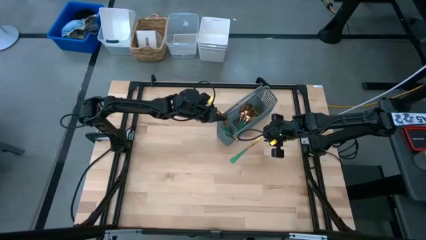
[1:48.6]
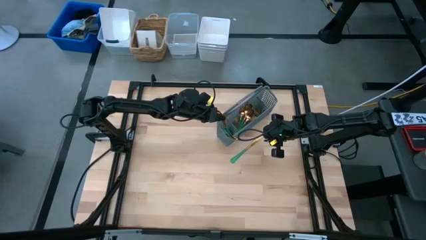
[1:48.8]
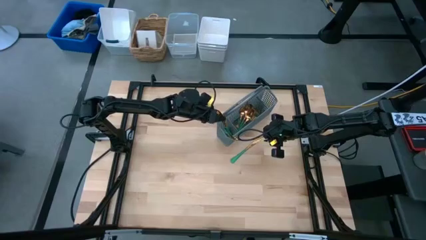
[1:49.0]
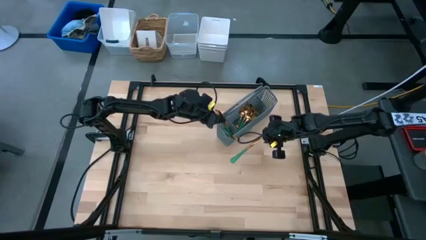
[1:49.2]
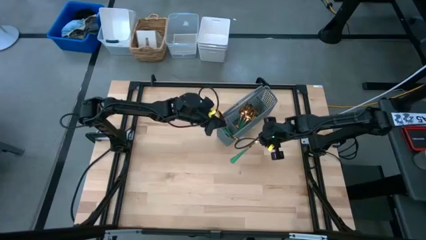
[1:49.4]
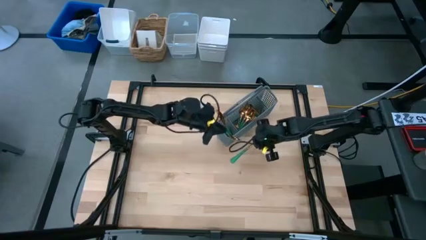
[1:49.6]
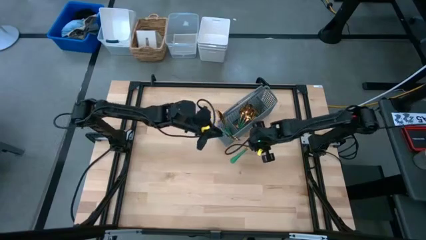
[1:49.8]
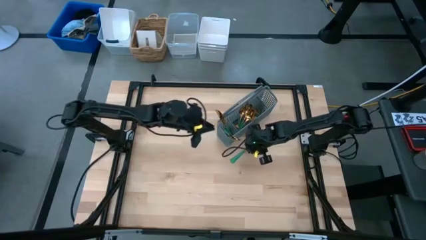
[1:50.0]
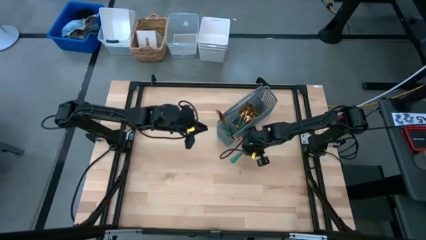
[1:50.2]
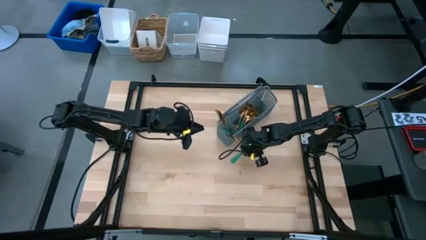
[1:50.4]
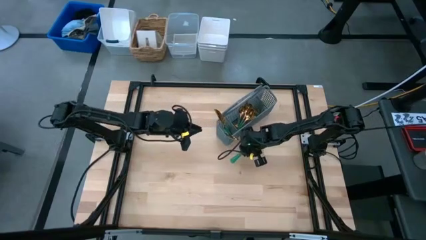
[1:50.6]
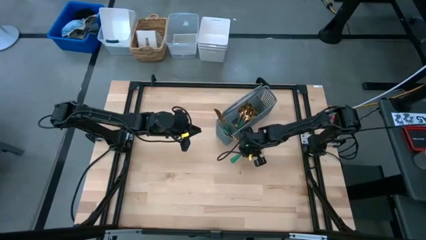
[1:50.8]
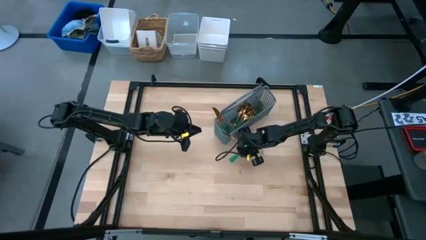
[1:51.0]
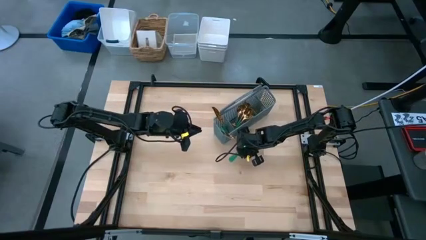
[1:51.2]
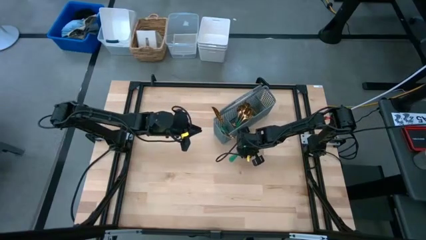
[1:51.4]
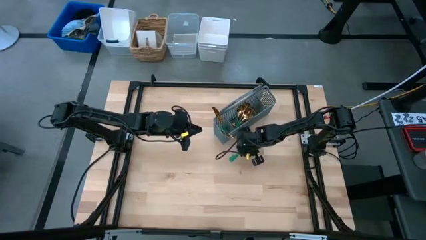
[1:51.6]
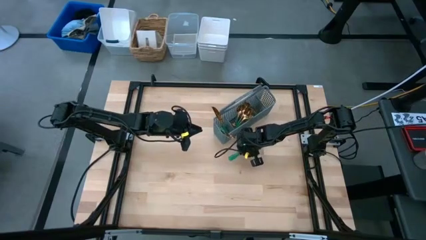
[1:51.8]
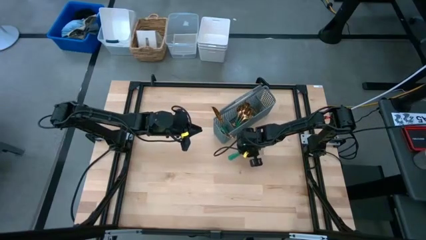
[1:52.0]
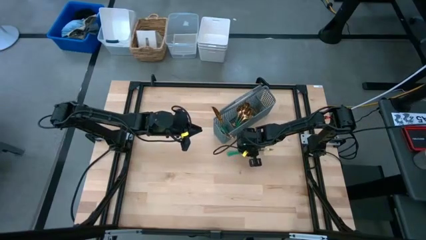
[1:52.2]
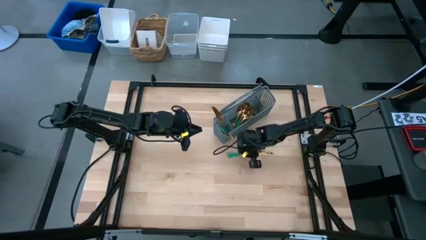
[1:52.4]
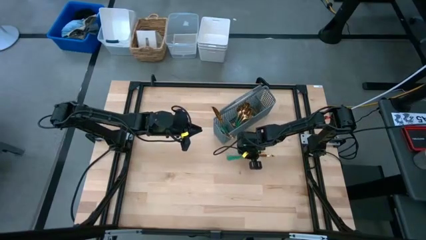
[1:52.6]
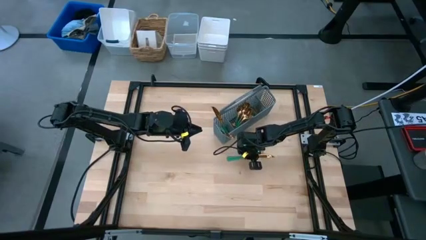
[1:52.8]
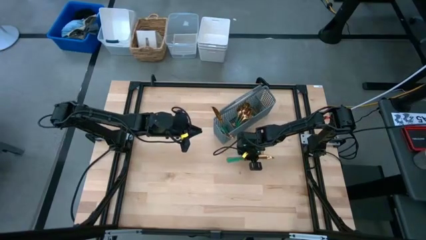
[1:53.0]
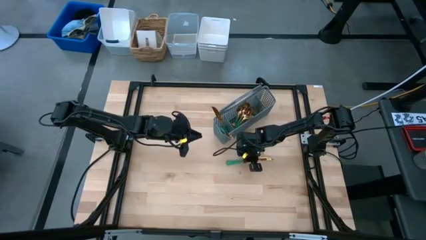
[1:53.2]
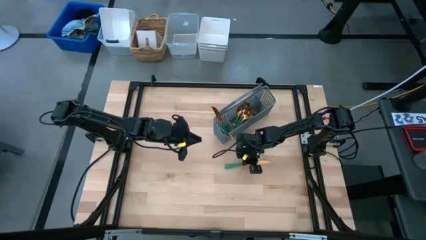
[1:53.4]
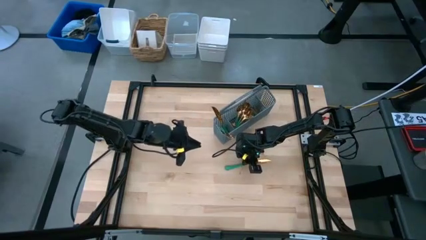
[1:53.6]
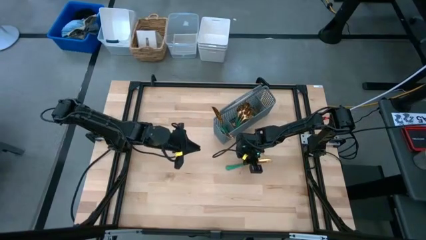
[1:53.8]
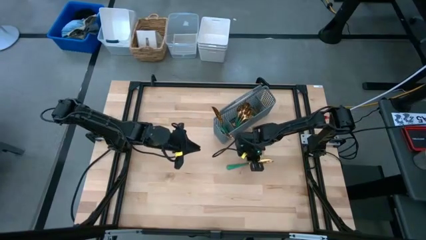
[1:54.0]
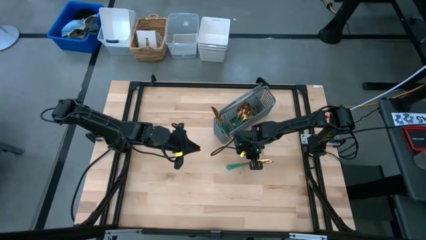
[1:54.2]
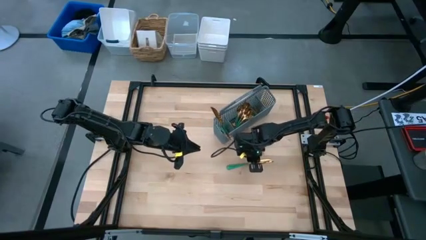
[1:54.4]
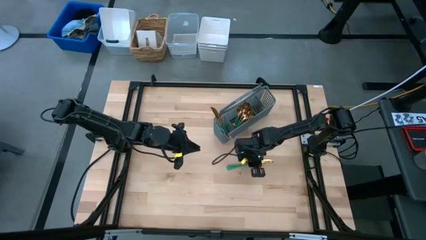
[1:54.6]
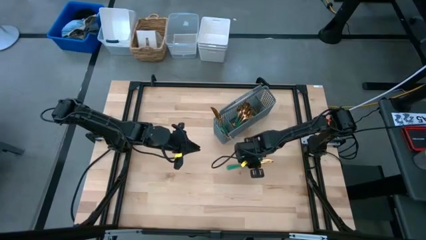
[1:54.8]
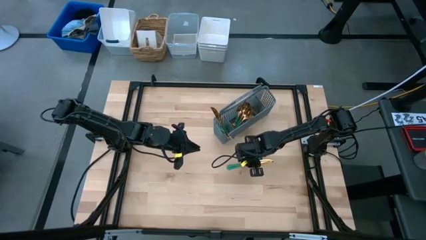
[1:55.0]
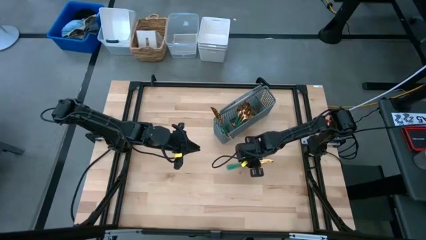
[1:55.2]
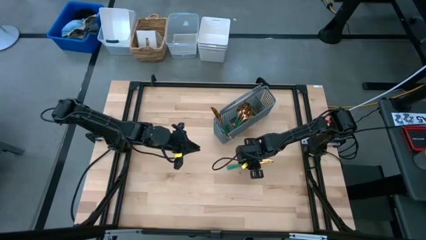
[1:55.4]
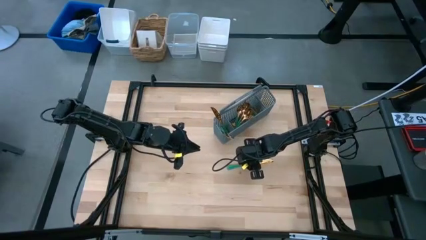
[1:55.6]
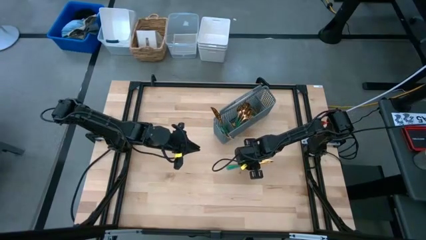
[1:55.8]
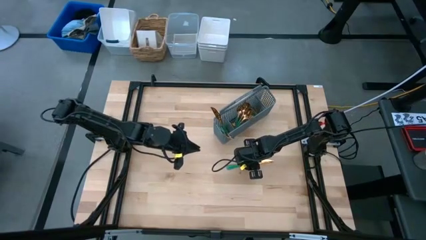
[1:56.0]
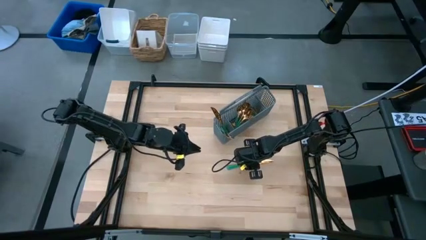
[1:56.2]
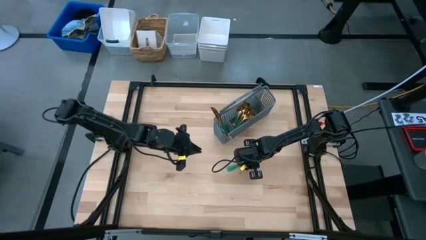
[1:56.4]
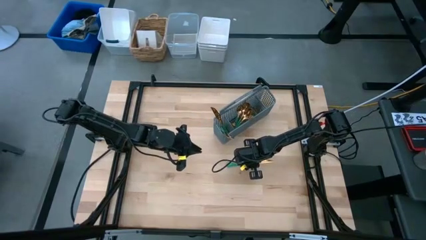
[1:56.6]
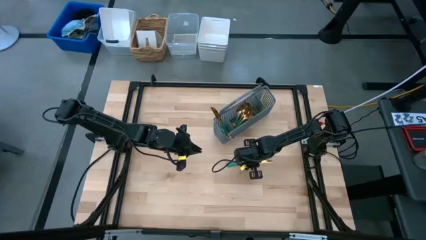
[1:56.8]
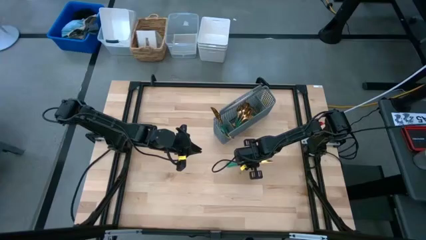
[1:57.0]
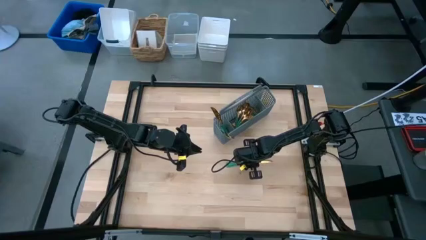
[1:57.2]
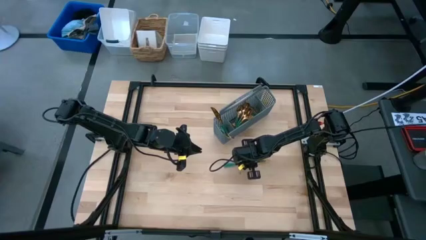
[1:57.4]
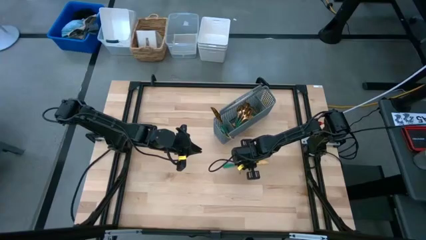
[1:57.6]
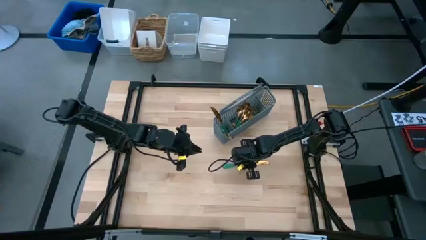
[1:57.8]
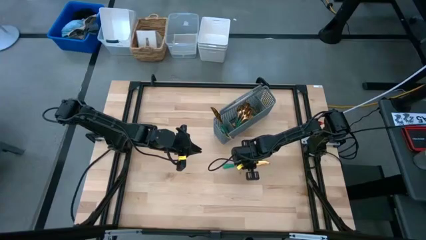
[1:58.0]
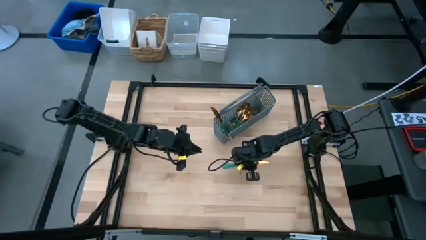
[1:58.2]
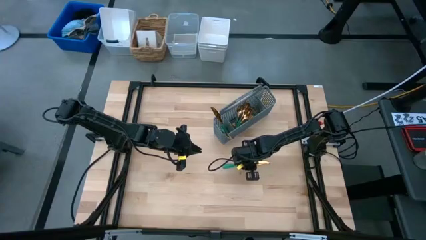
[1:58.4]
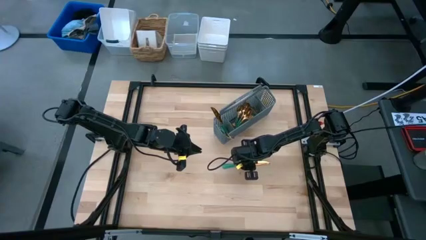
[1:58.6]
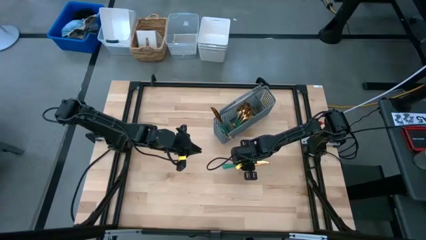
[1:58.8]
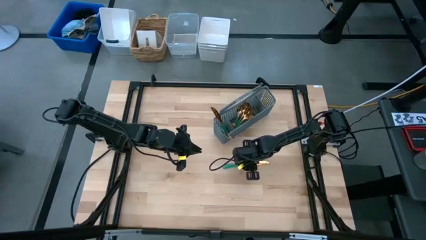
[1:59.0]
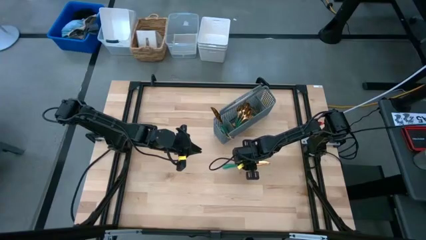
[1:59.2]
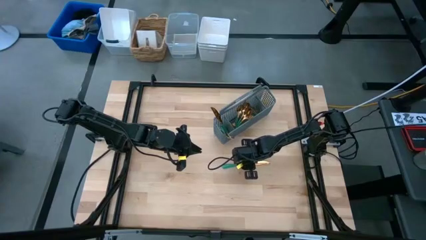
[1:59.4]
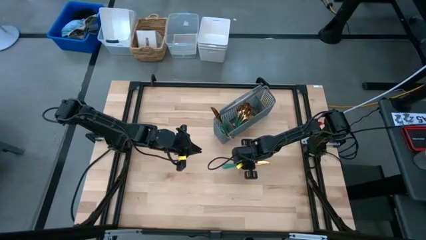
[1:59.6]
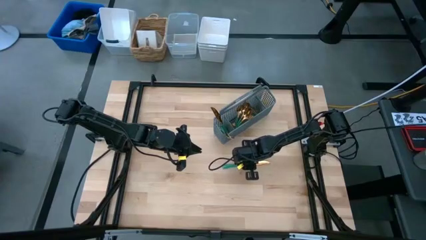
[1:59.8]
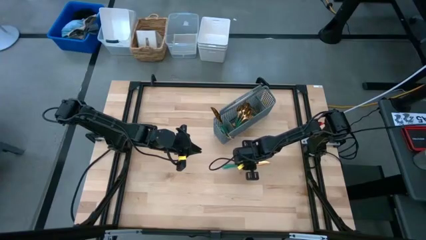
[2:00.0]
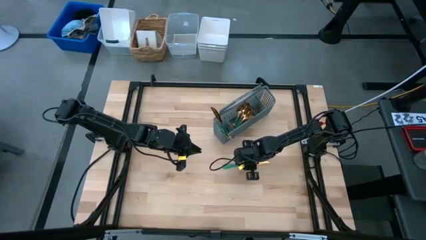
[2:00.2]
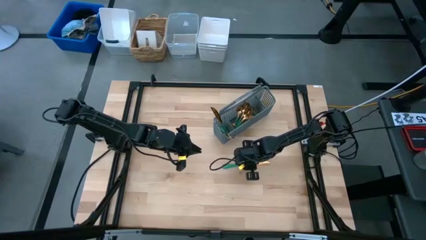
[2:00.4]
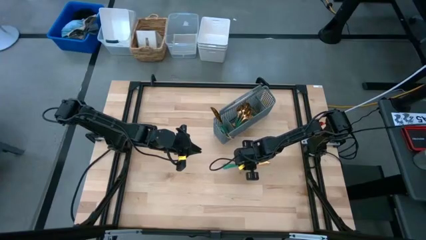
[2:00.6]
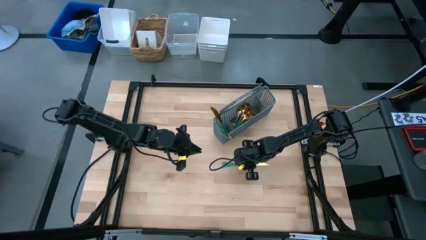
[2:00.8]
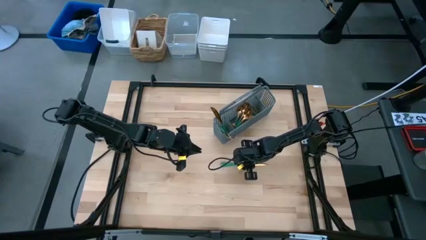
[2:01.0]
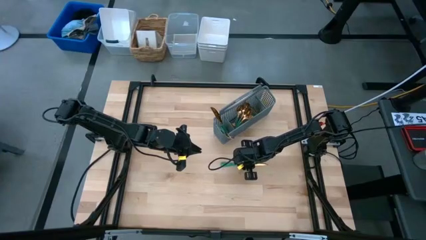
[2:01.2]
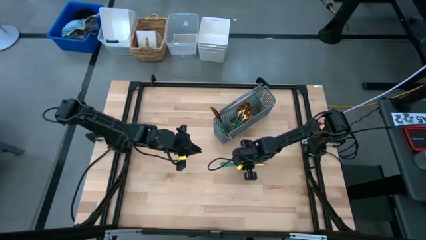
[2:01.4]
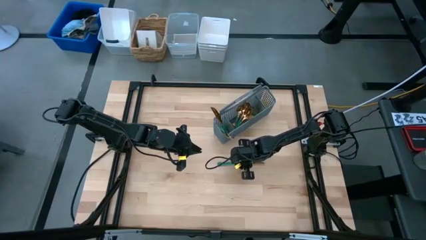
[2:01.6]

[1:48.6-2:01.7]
Task: Sort silverware
Put the knife into the basket
